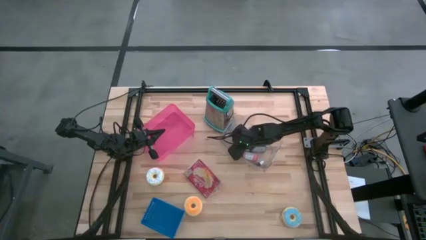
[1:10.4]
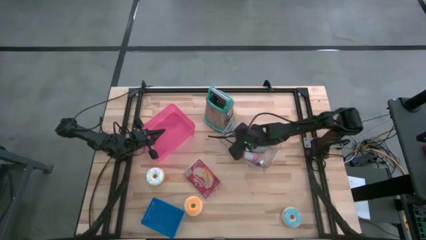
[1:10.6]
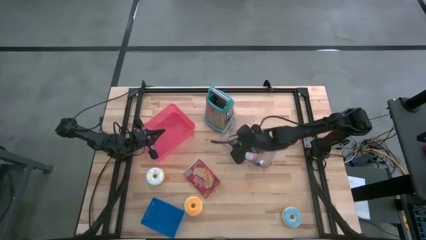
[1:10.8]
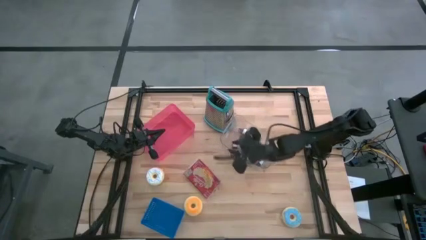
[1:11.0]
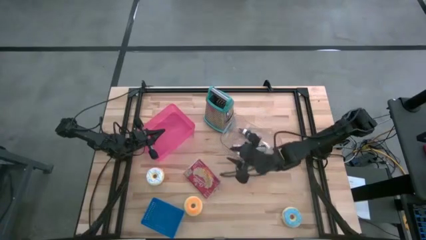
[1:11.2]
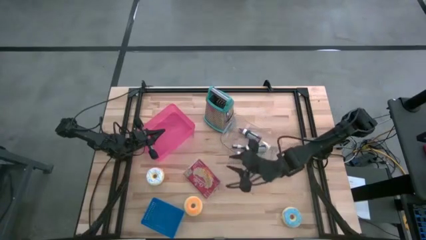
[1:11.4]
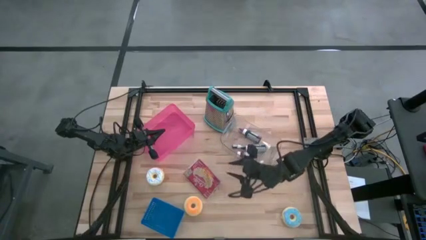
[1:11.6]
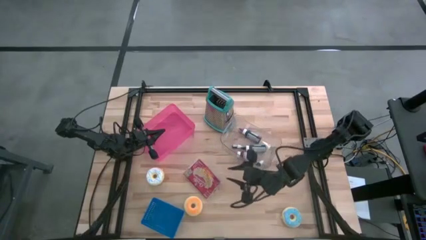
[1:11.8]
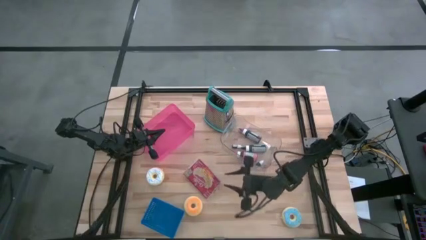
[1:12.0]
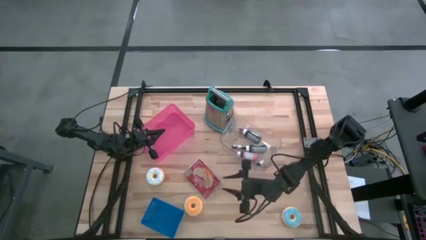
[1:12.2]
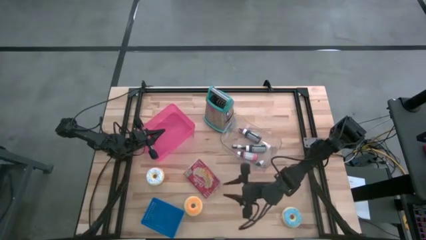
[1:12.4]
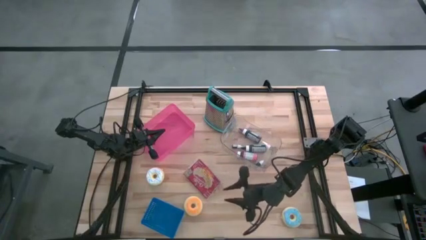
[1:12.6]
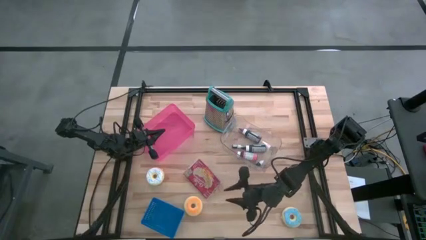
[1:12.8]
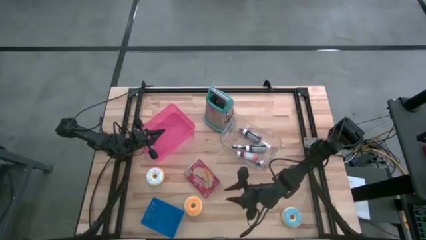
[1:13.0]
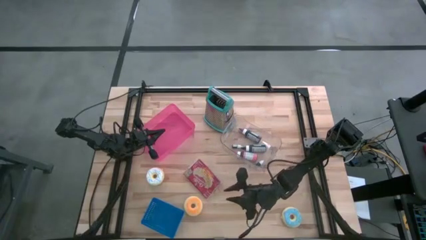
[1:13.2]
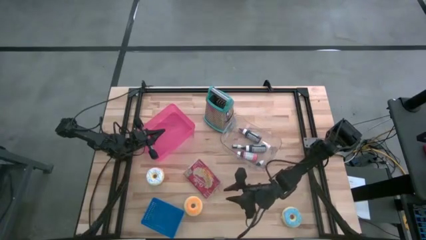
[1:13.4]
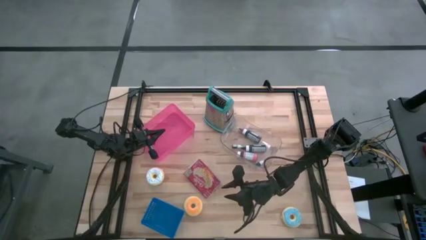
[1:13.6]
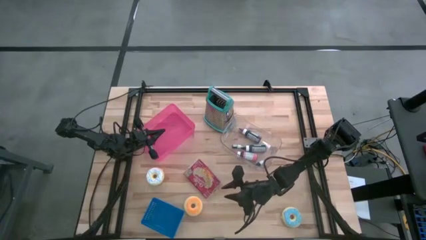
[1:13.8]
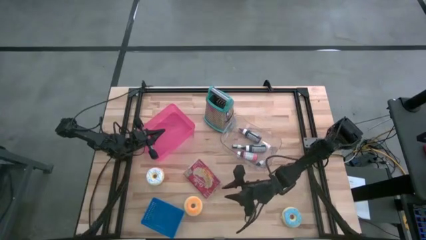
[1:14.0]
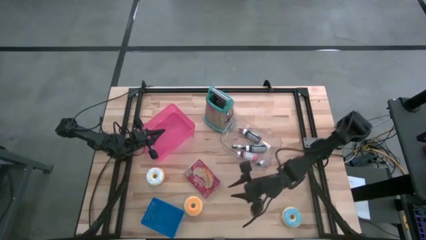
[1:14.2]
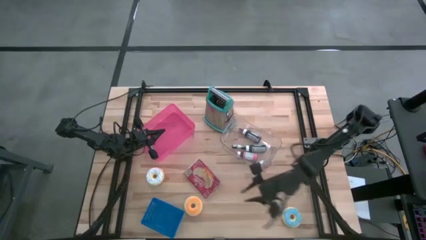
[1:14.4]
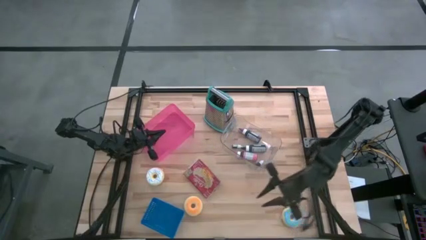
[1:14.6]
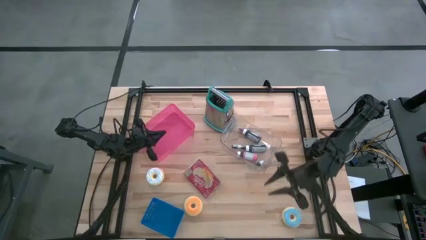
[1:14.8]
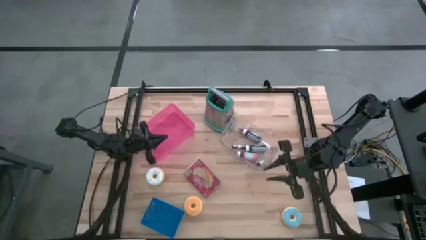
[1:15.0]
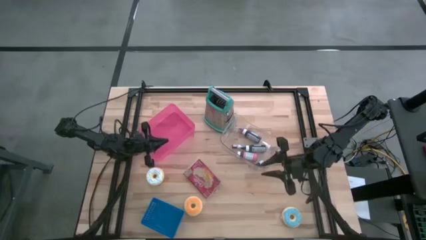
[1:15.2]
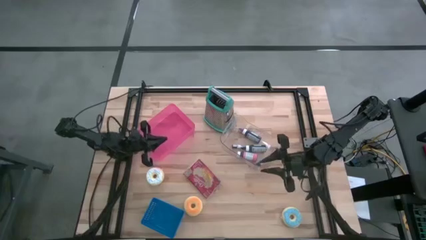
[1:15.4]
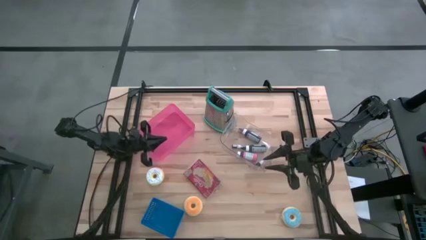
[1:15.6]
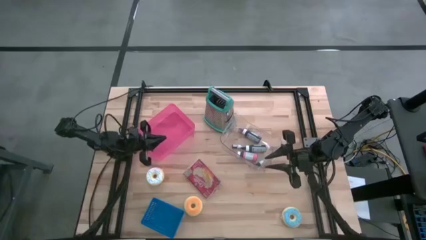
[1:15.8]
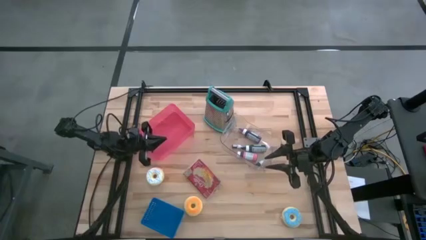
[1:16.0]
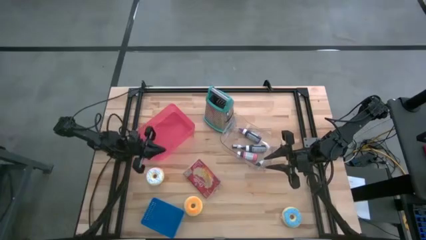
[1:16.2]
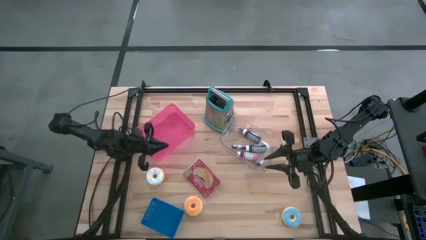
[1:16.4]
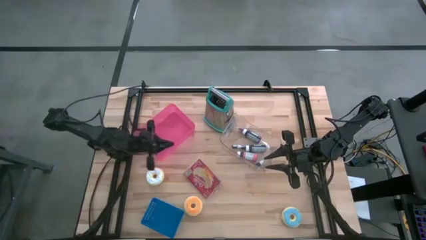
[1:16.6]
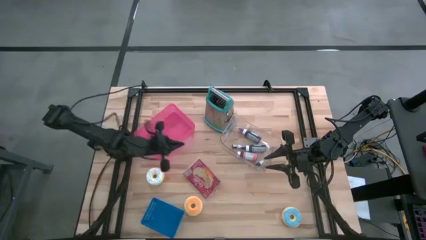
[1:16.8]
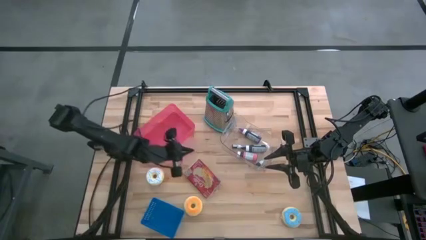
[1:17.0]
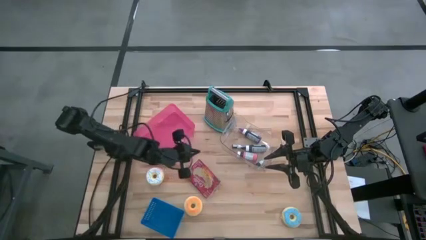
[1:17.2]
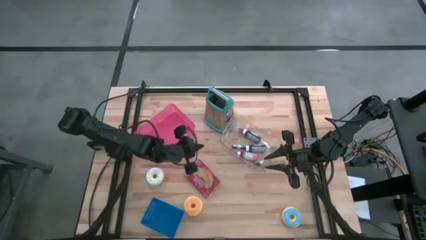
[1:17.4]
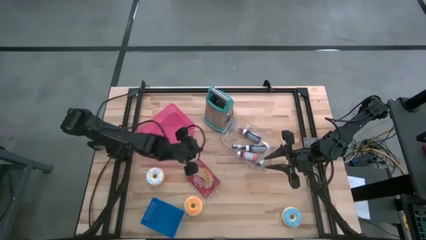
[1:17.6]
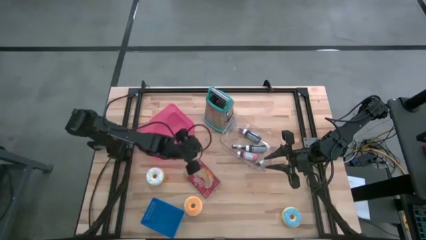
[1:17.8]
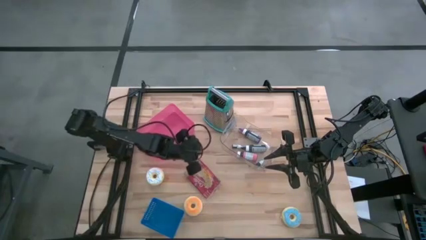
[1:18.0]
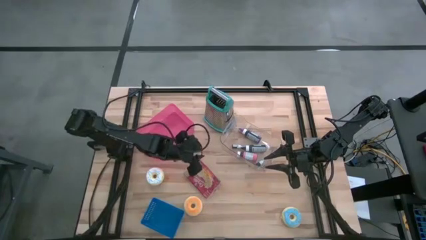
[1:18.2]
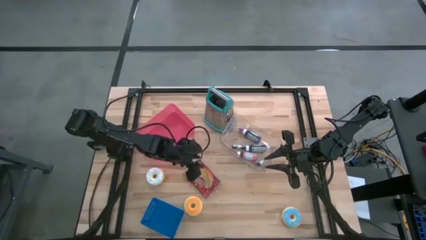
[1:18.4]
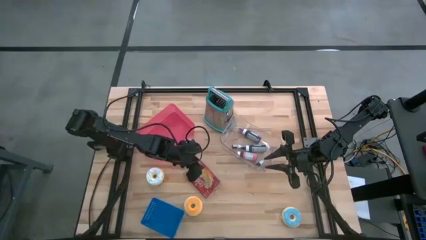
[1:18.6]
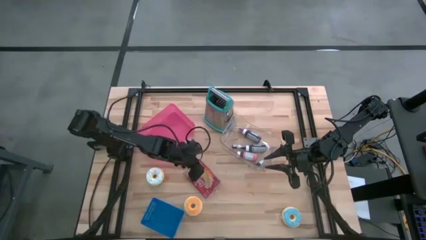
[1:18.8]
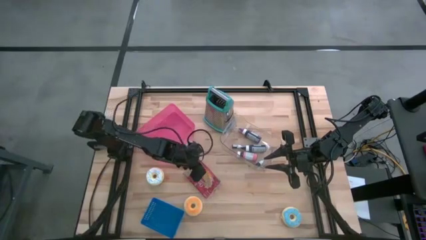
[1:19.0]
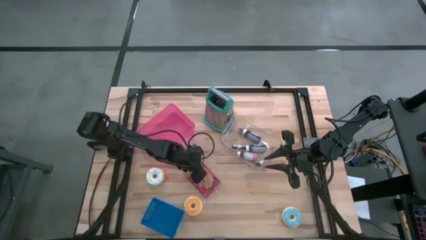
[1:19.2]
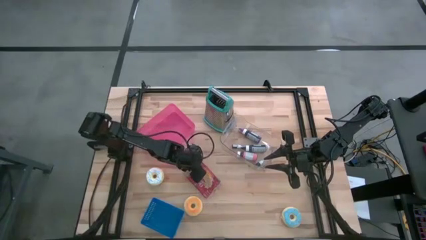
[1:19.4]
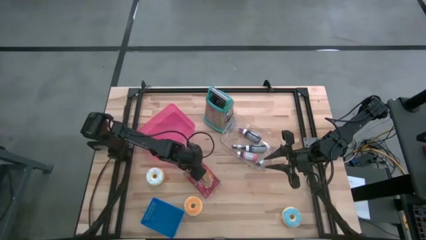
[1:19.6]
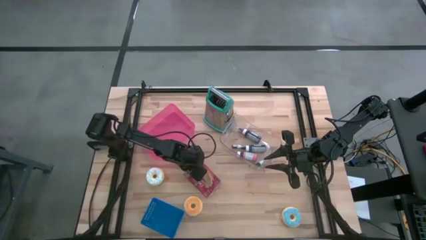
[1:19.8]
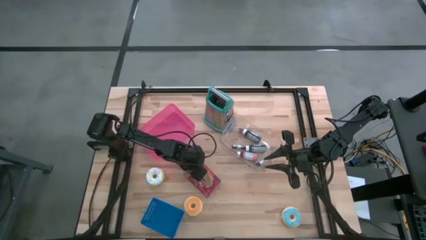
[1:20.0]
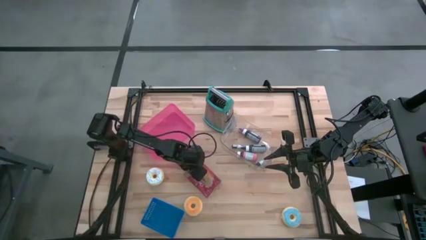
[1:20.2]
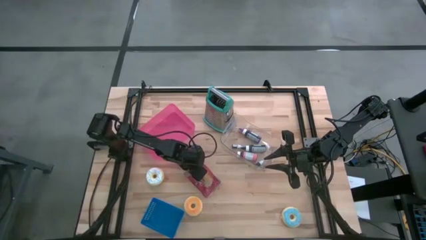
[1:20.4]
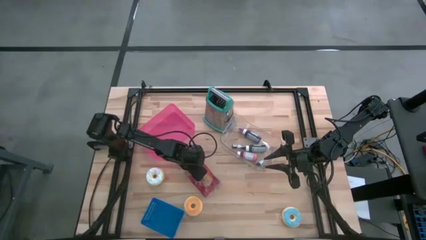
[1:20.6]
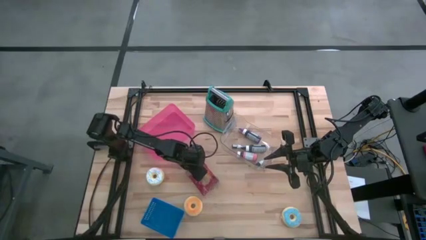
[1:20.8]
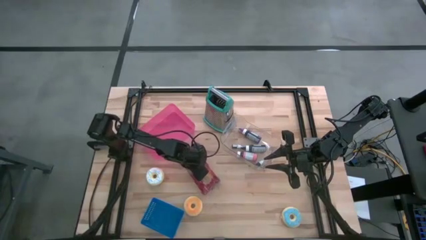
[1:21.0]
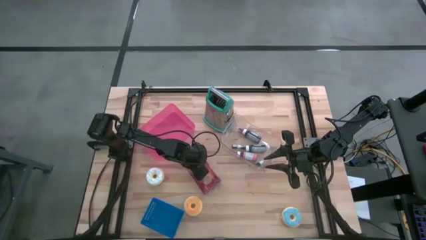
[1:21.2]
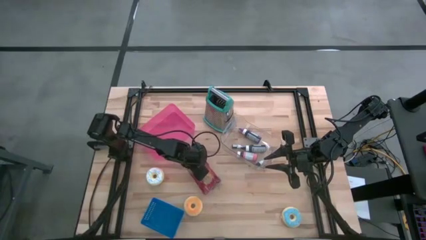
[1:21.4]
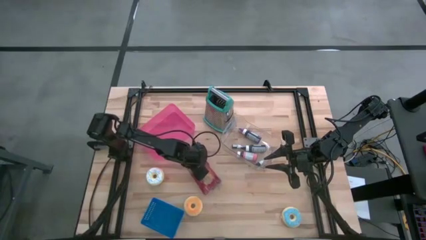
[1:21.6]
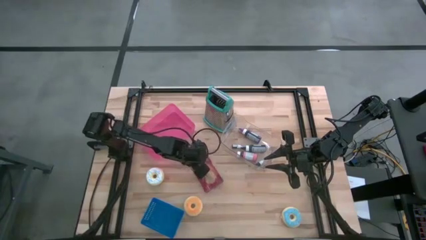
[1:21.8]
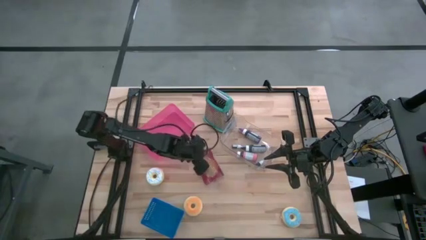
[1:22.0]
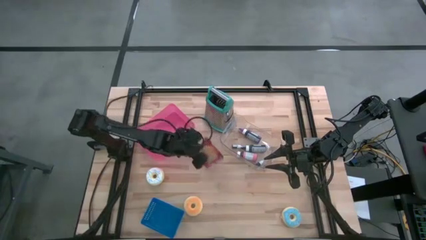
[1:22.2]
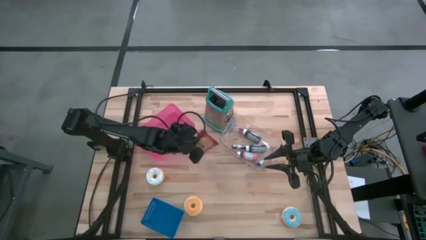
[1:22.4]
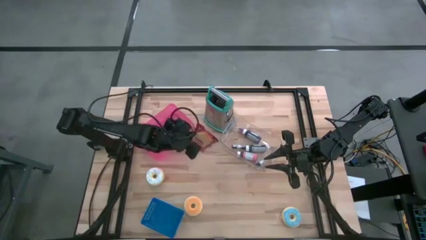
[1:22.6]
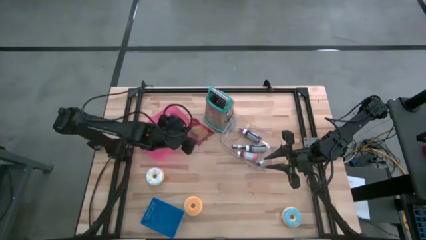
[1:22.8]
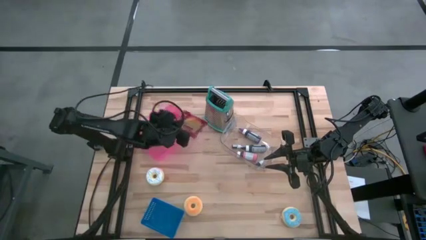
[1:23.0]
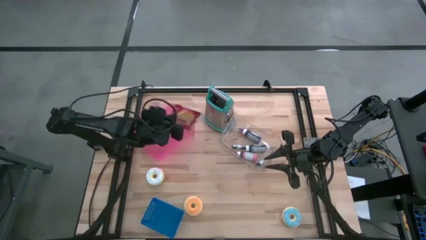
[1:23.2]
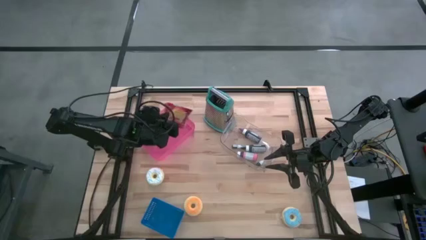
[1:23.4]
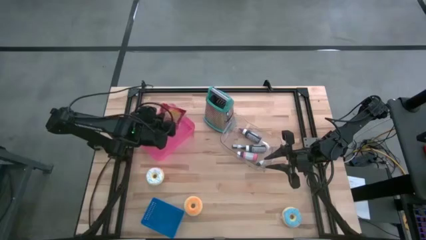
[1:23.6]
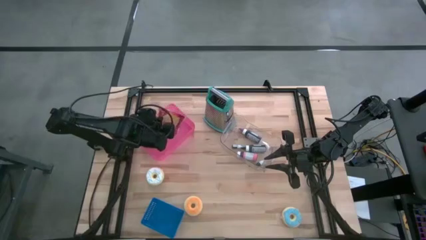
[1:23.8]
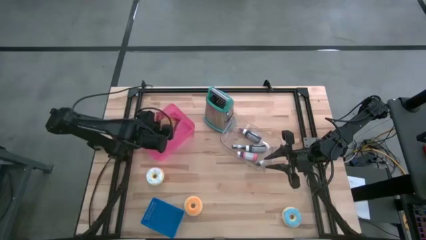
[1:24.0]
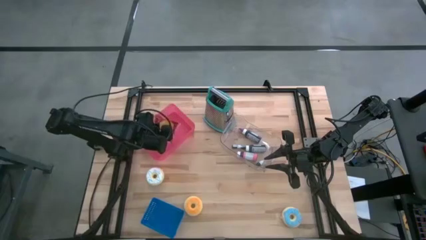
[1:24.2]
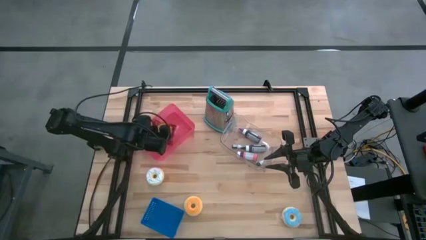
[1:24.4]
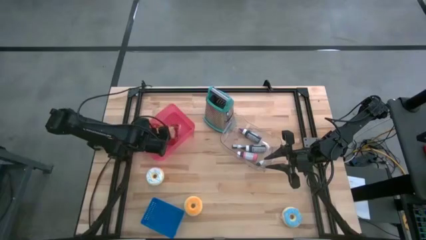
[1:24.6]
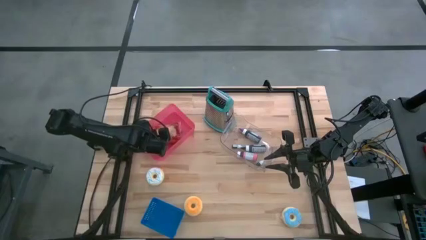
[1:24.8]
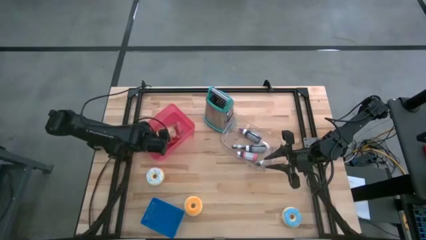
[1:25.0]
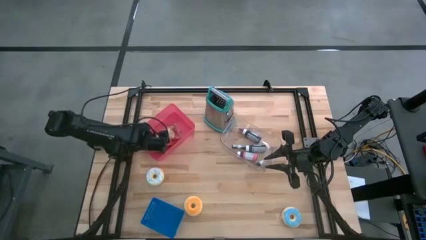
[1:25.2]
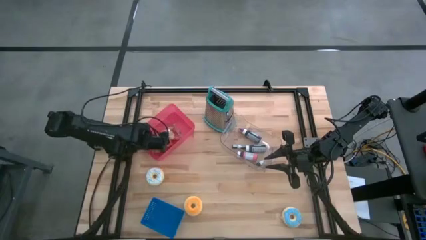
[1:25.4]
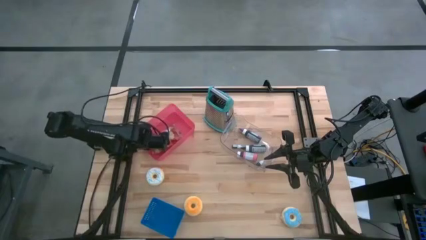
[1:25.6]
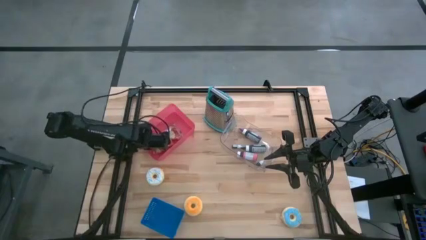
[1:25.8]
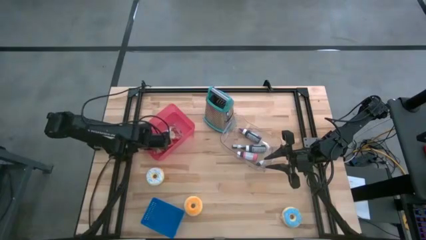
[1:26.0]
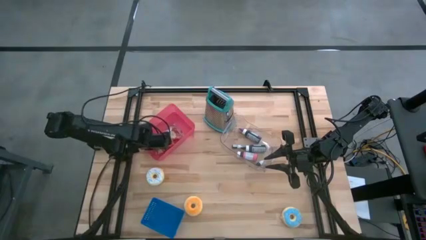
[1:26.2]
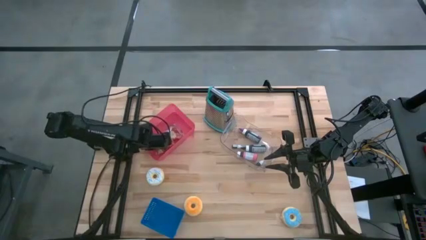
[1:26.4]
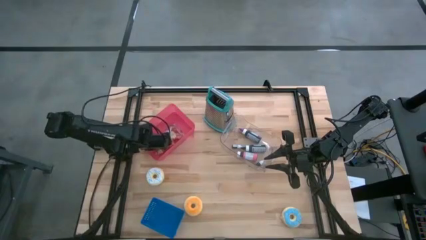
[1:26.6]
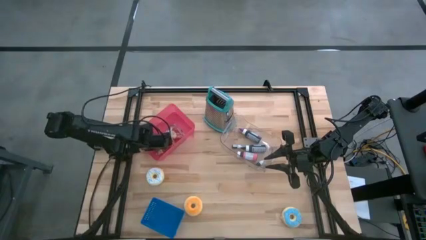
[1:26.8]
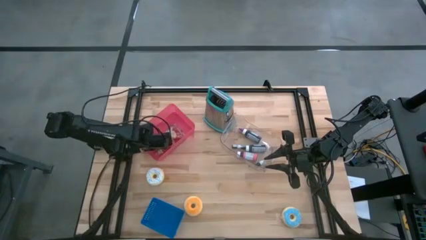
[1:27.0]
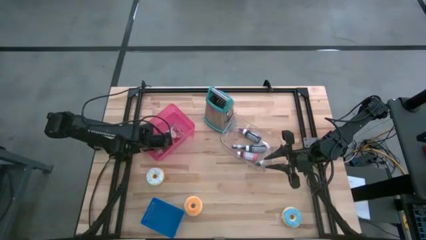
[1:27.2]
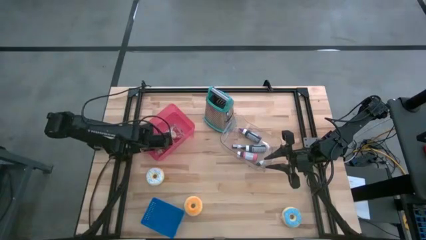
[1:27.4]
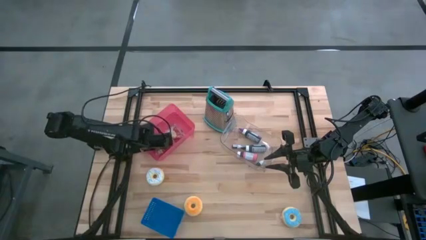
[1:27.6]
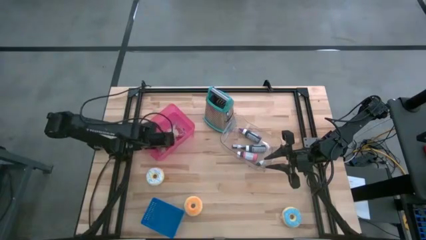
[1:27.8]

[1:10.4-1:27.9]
Task: Pick & Place Food Item
Put the red popcorn bag into the pink bin
